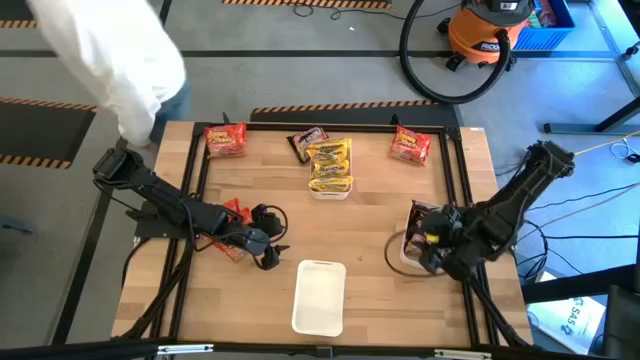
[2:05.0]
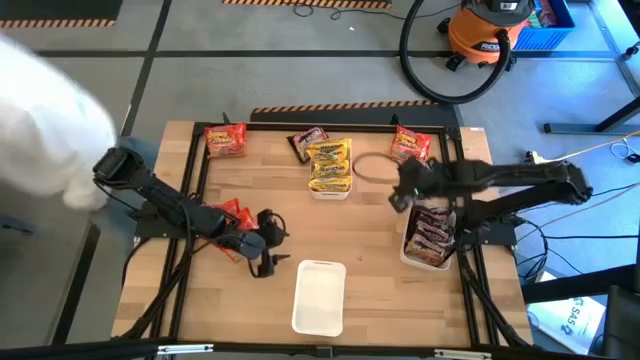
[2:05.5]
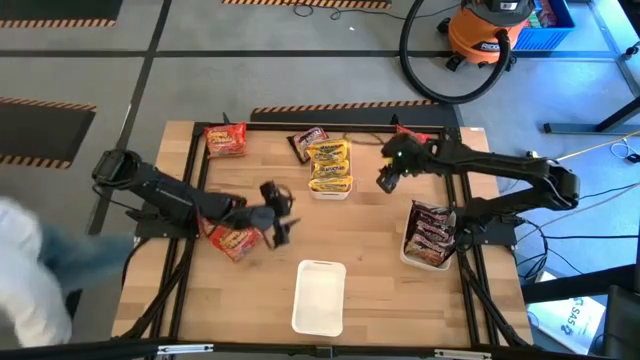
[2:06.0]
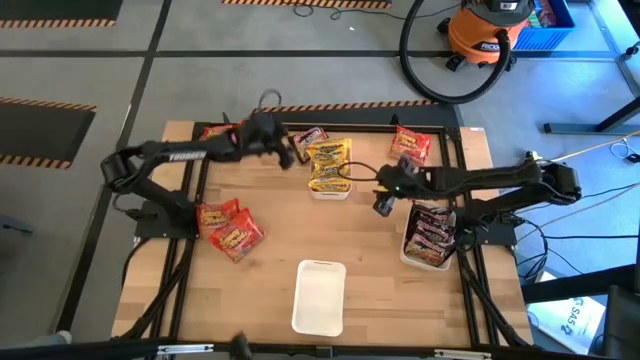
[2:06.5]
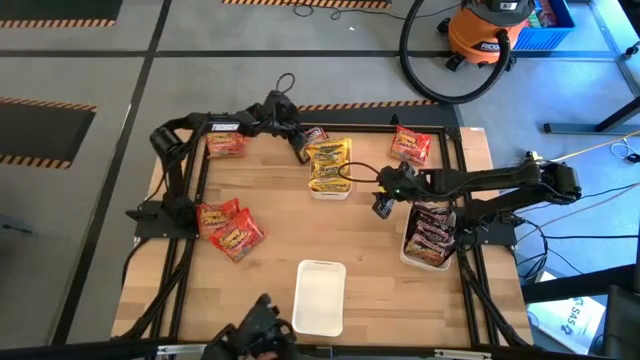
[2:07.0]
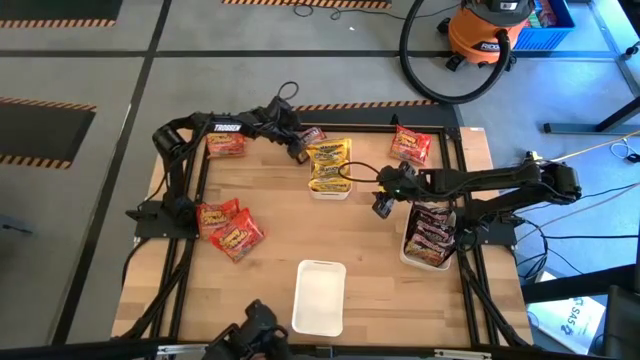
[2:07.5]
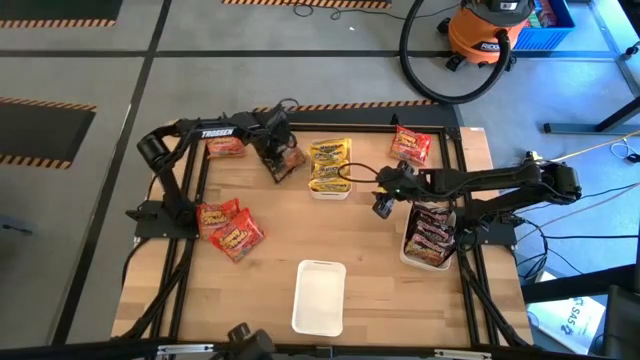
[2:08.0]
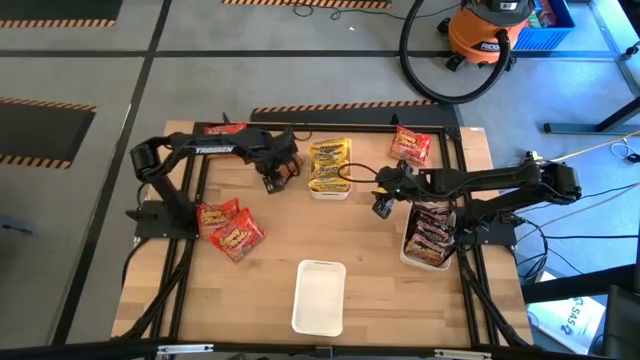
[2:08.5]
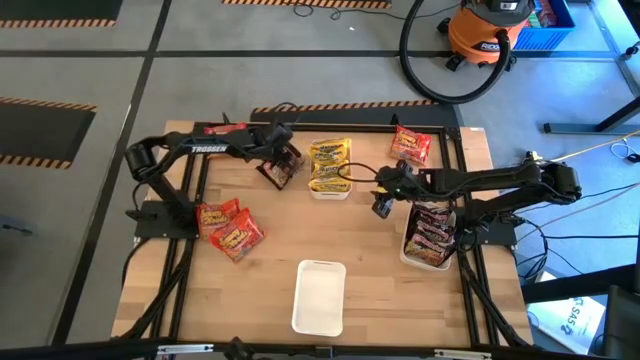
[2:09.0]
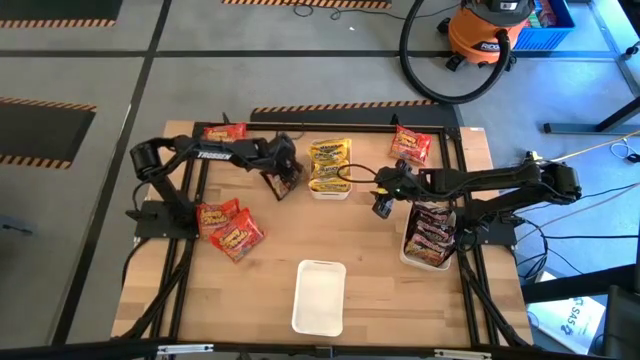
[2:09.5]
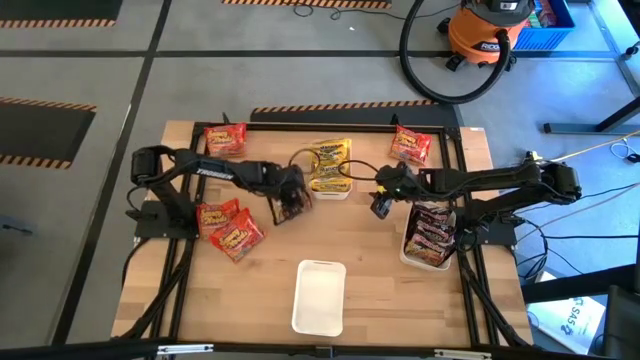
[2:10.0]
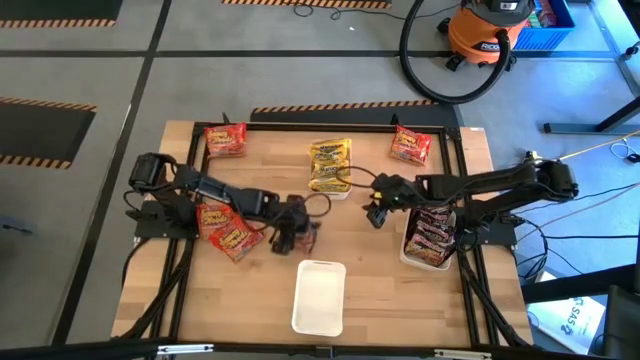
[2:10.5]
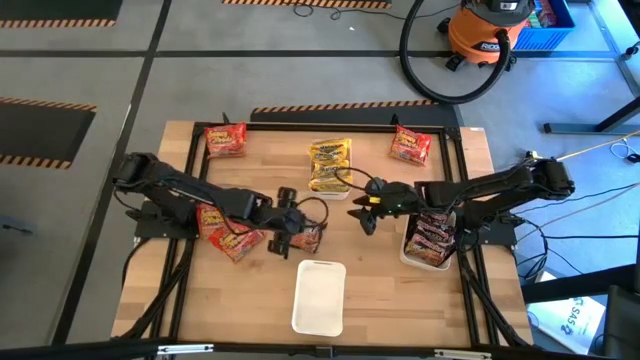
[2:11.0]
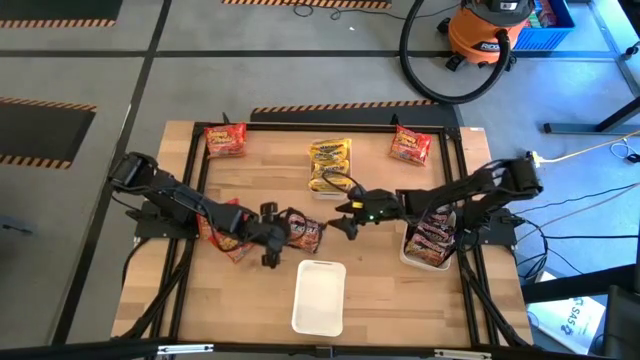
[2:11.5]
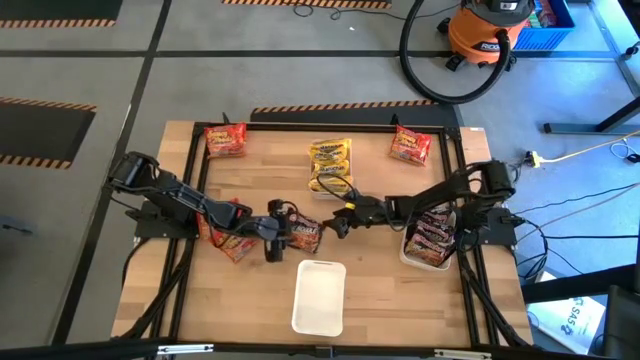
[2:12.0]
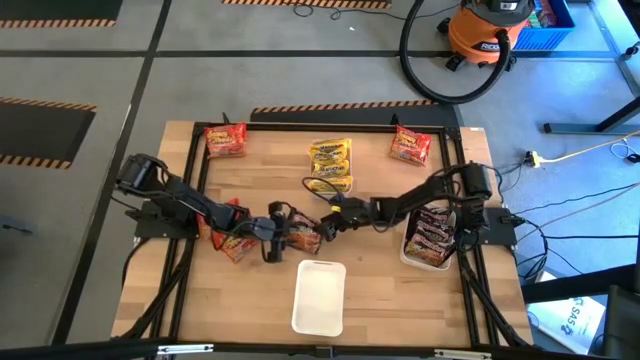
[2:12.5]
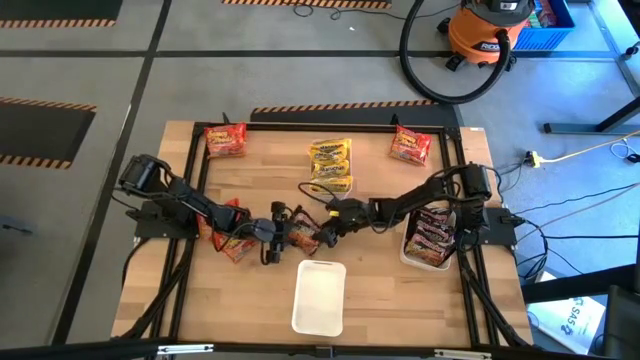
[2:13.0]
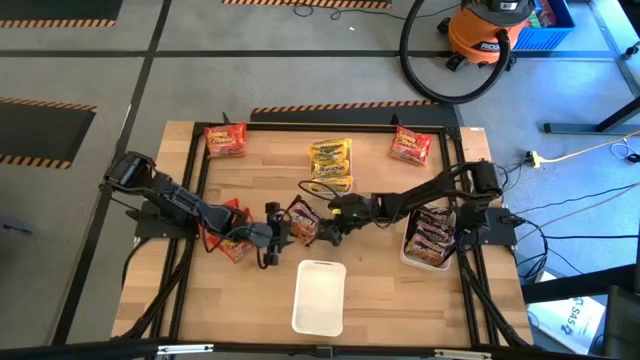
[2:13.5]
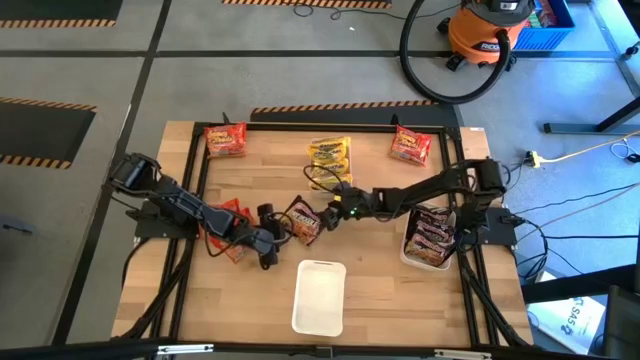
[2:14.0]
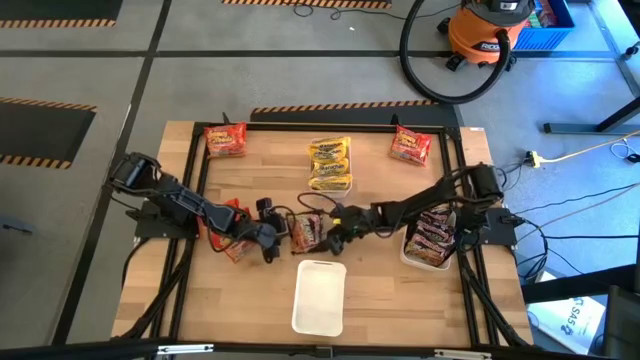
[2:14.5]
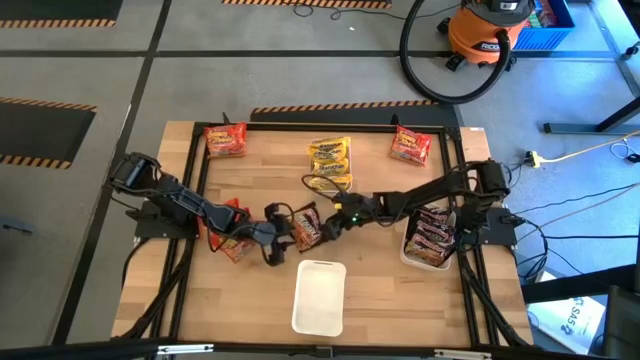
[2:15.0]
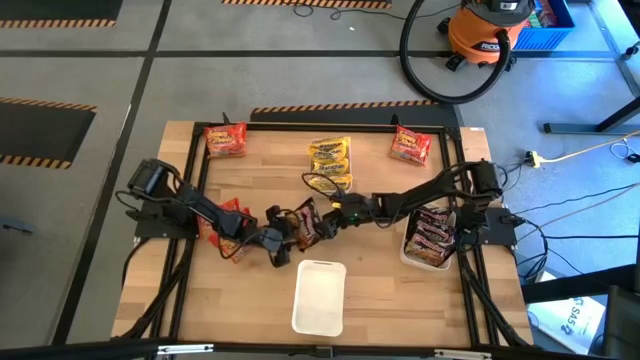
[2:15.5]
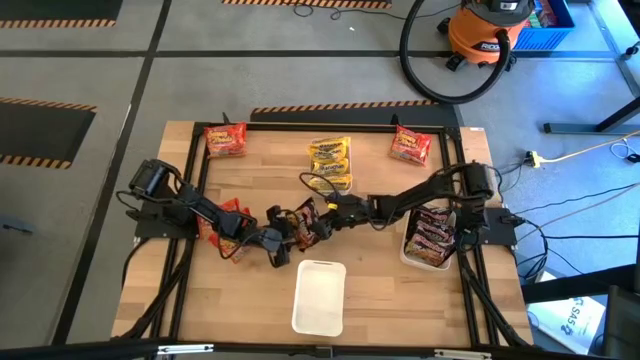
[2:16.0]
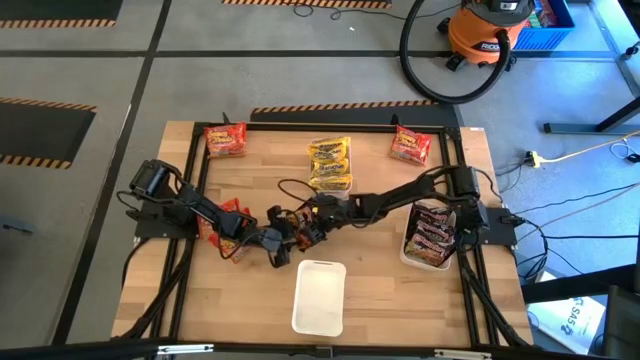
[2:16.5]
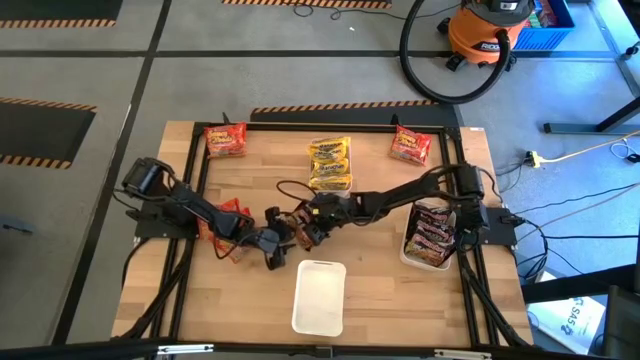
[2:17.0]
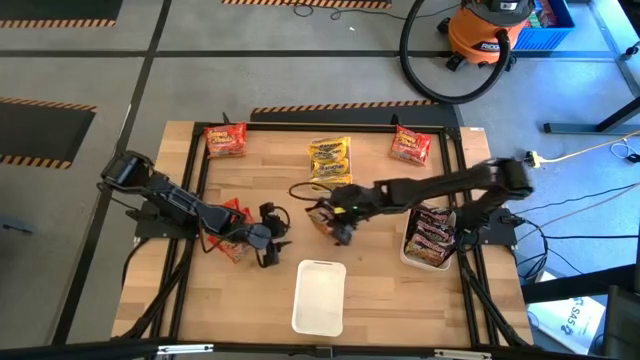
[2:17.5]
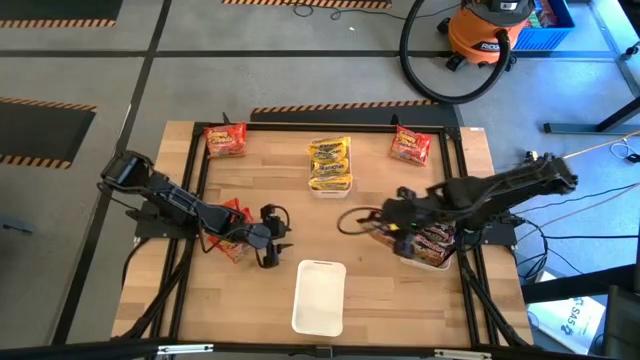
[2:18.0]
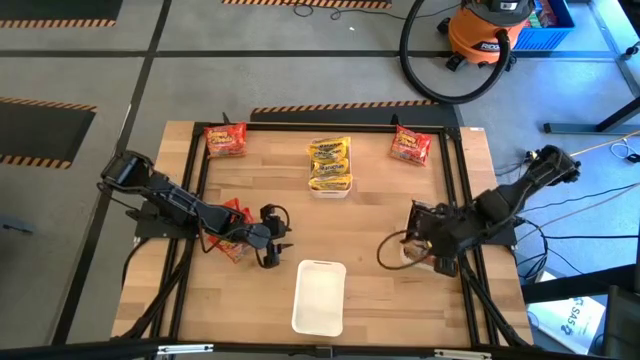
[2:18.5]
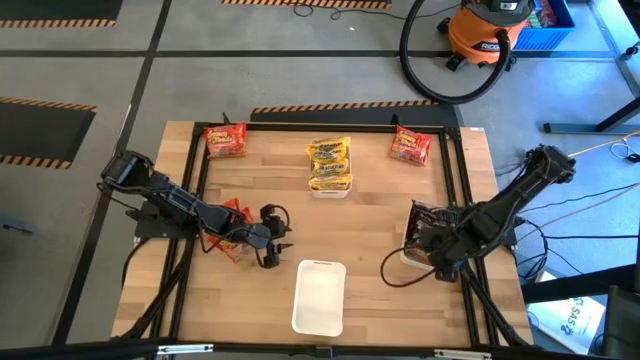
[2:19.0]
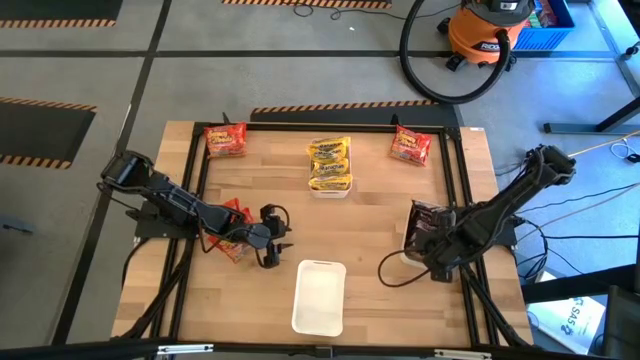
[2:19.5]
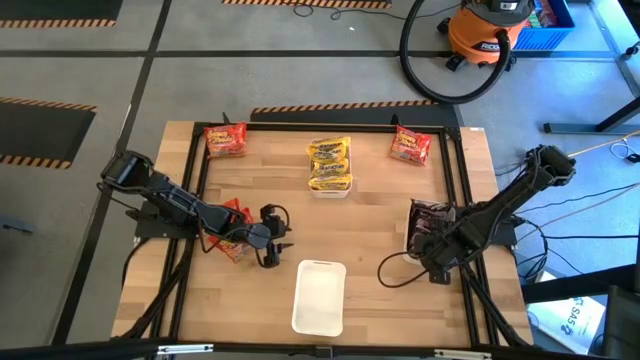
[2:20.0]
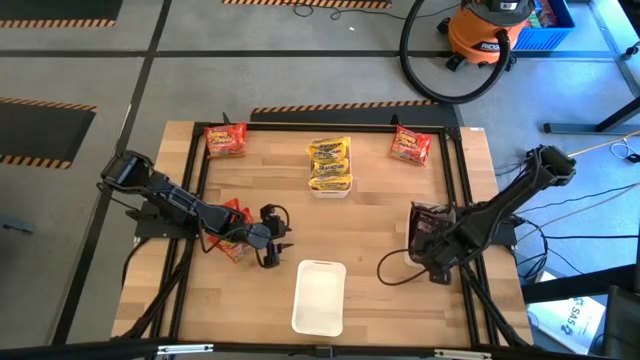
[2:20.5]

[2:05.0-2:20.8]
Task: Sort Maruchan noodles
Put the black noodle pack into the right white bin

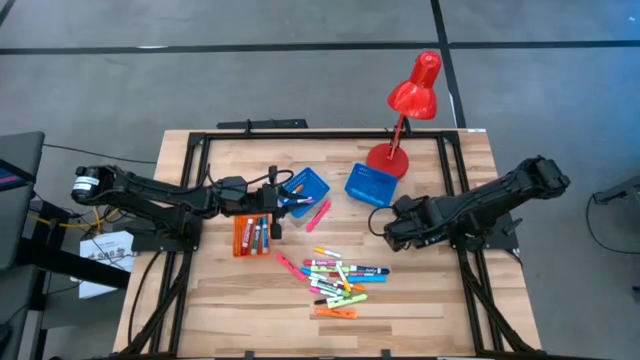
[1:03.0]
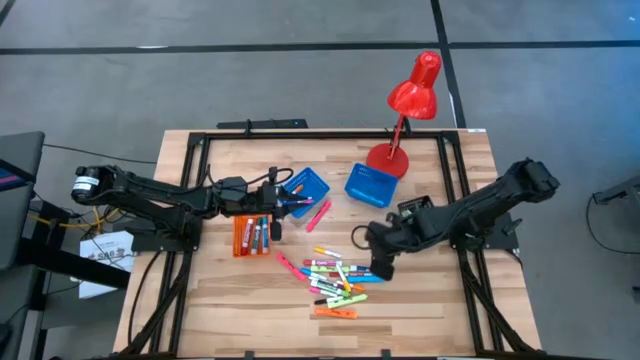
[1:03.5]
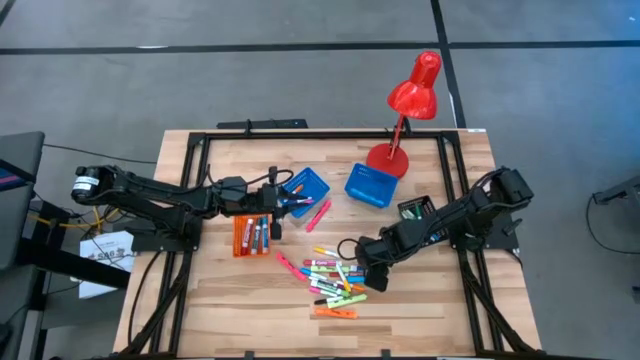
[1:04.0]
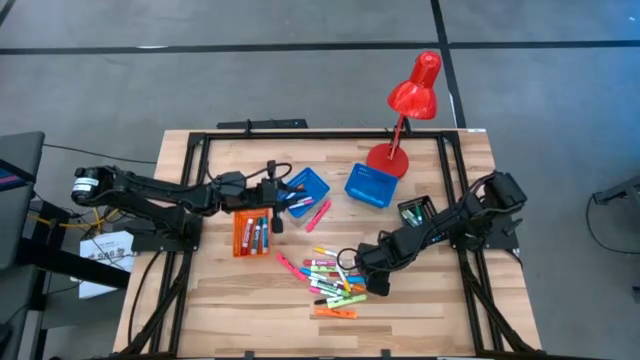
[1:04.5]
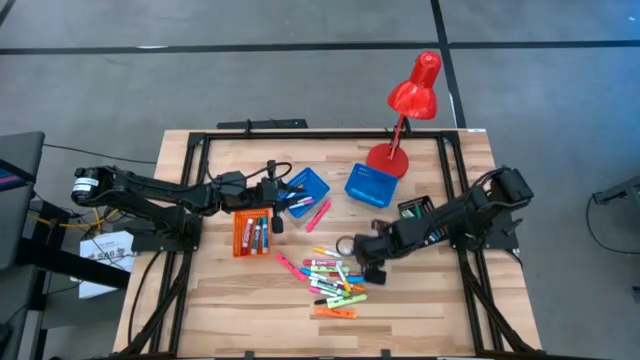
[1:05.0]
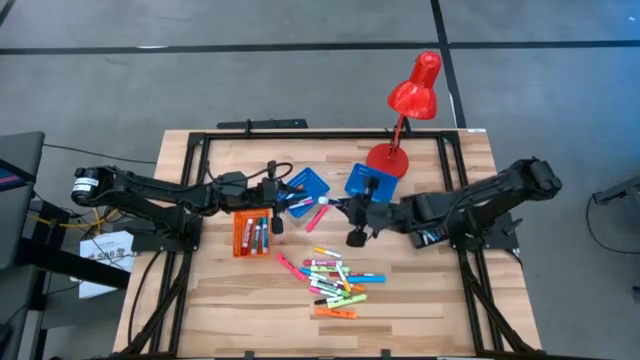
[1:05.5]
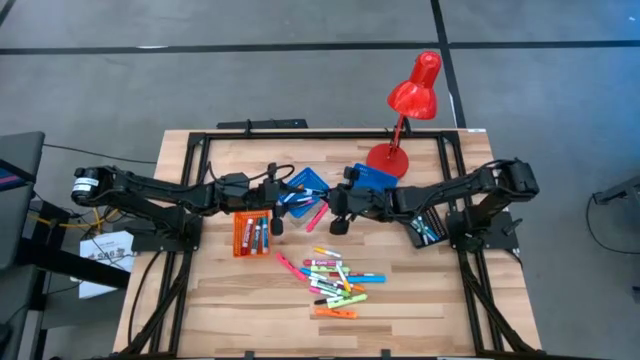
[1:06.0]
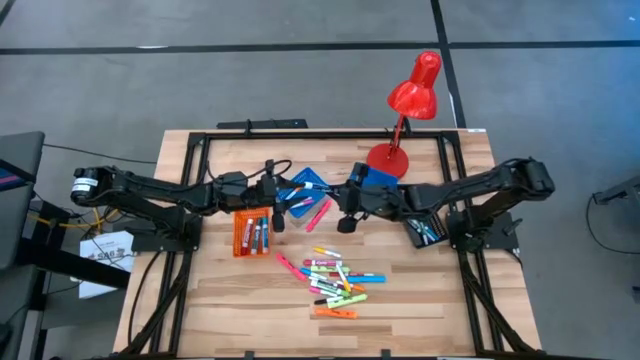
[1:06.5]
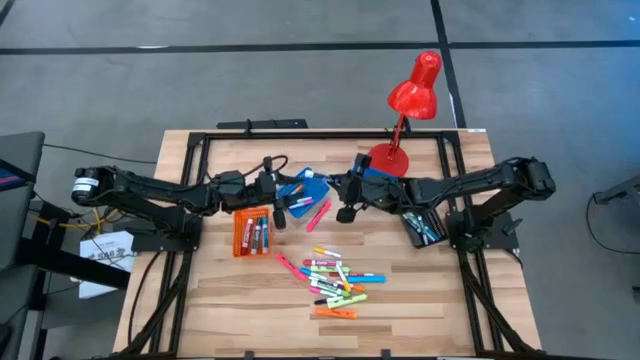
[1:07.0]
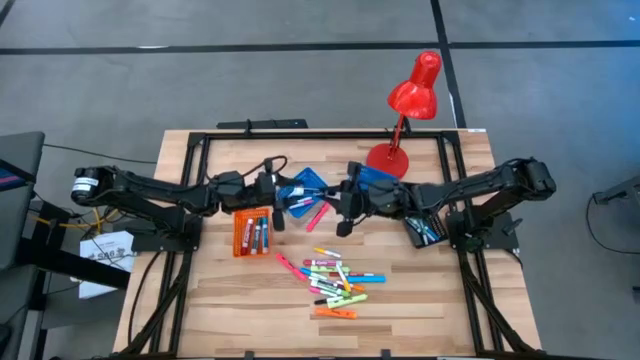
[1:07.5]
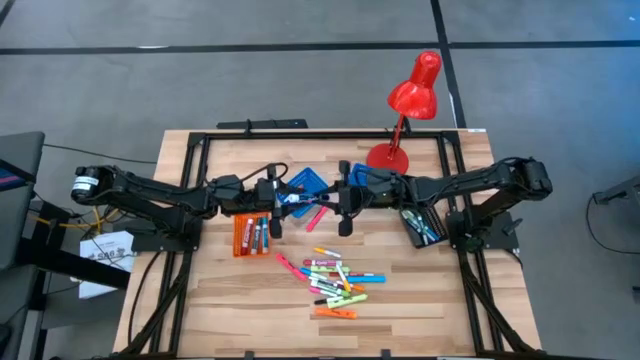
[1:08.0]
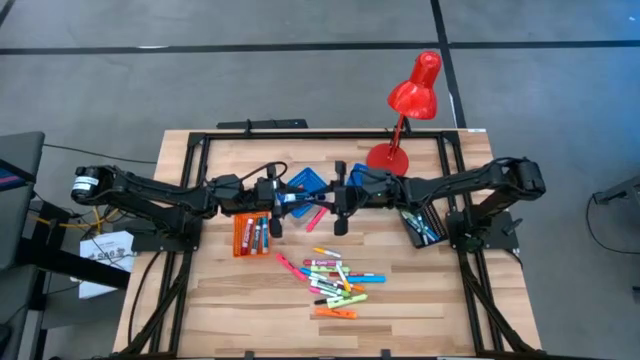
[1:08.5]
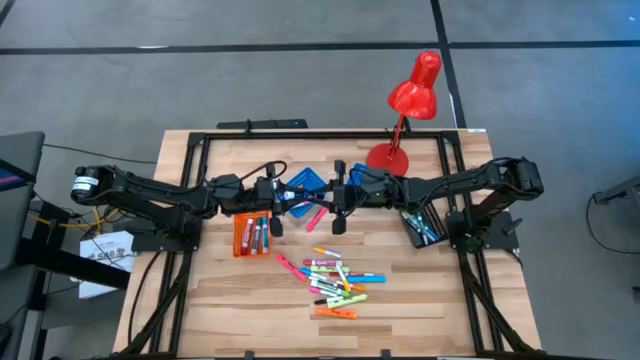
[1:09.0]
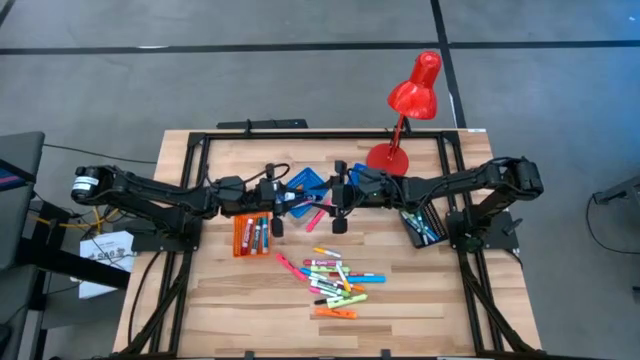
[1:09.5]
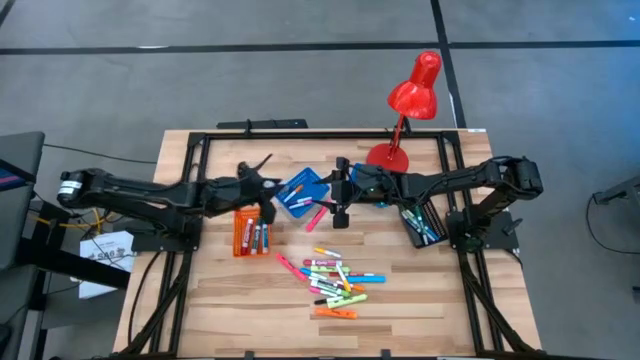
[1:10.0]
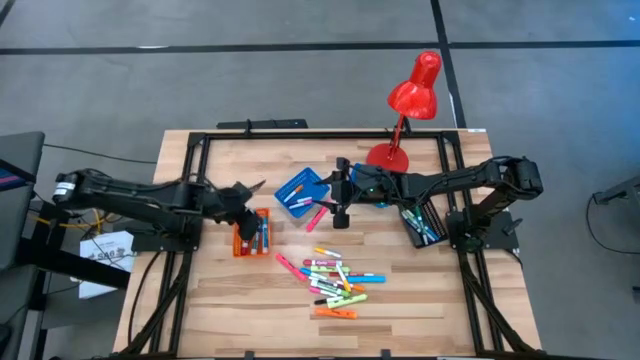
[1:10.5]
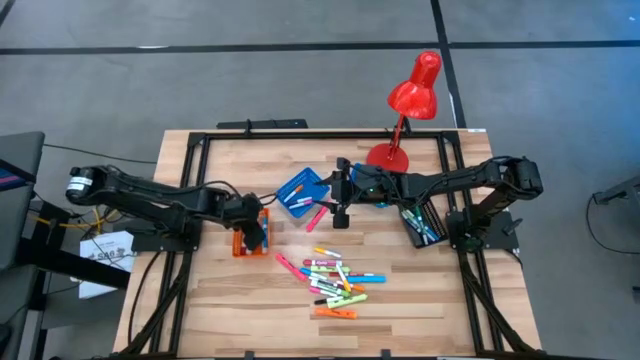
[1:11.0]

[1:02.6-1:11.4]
Task: Pick & Place Markers
Put the large dark blue marker pen into the orange bin
